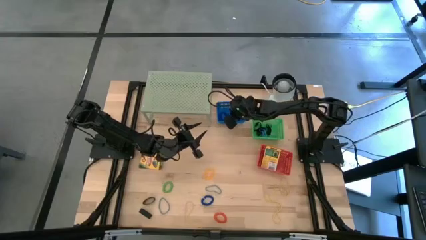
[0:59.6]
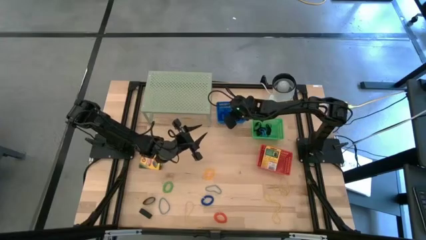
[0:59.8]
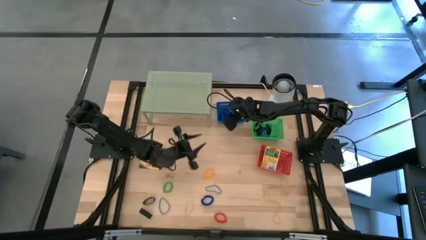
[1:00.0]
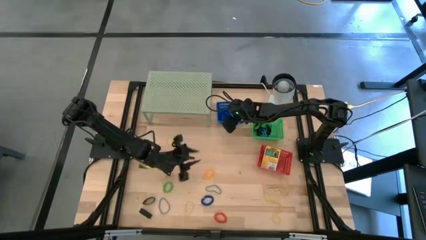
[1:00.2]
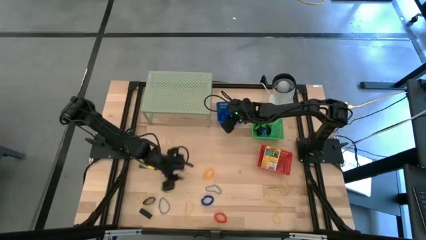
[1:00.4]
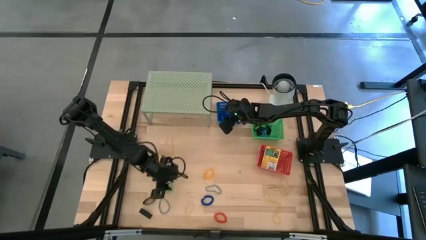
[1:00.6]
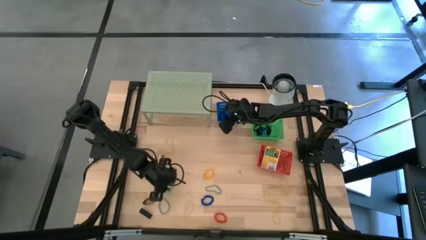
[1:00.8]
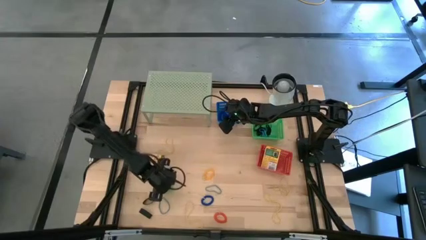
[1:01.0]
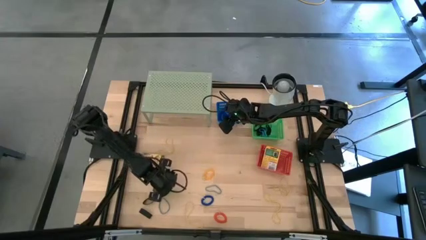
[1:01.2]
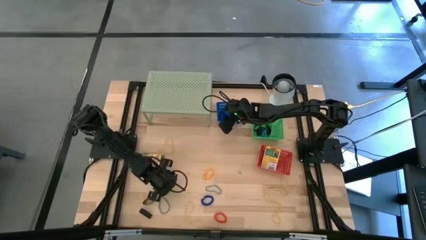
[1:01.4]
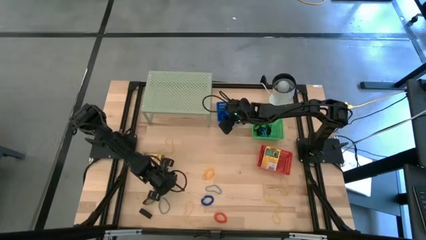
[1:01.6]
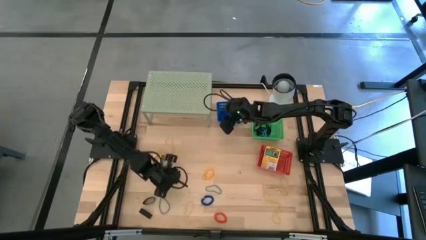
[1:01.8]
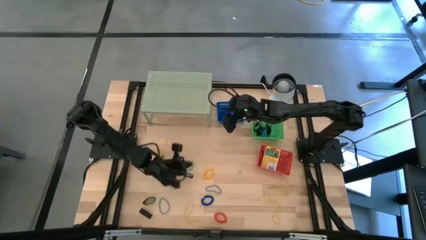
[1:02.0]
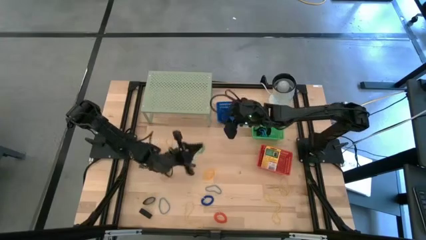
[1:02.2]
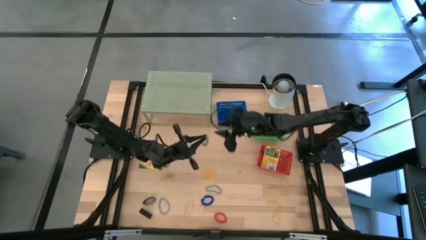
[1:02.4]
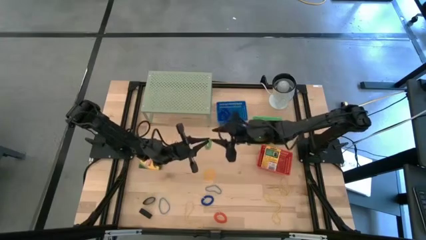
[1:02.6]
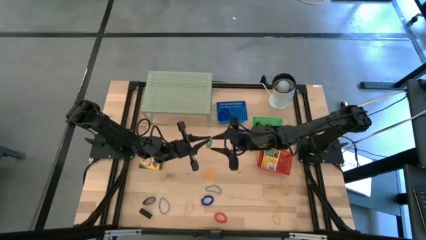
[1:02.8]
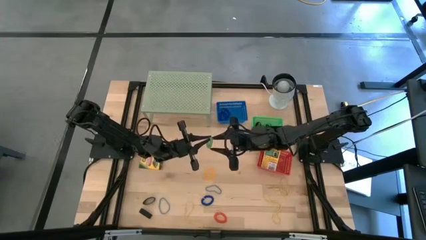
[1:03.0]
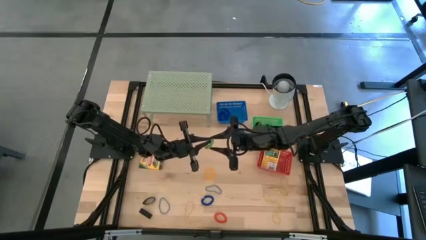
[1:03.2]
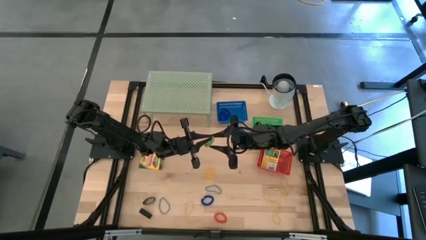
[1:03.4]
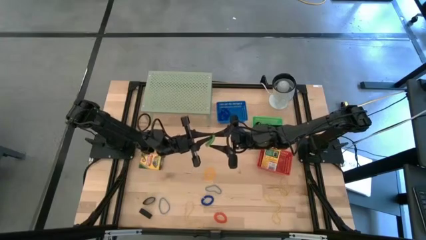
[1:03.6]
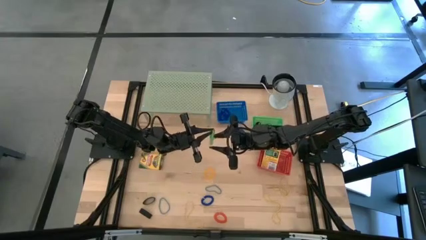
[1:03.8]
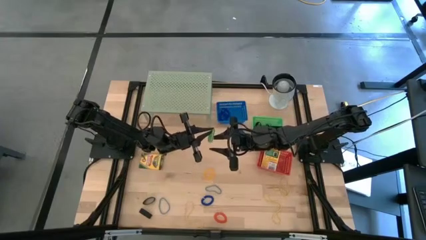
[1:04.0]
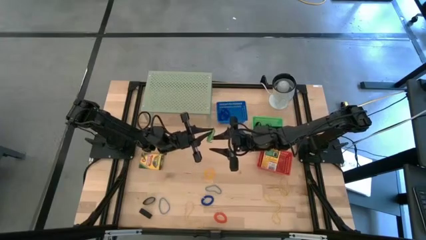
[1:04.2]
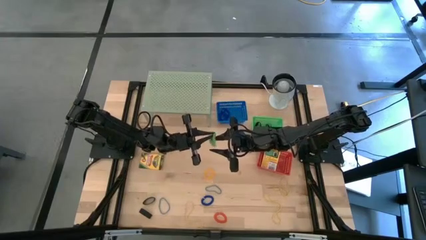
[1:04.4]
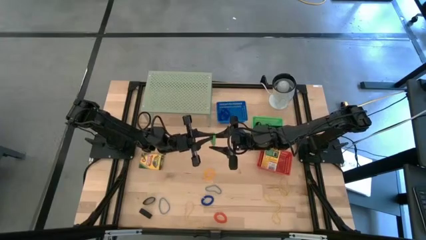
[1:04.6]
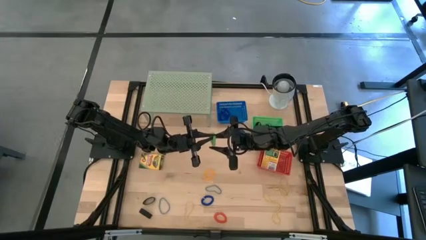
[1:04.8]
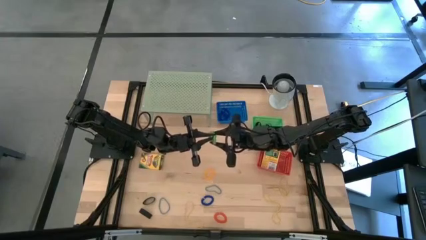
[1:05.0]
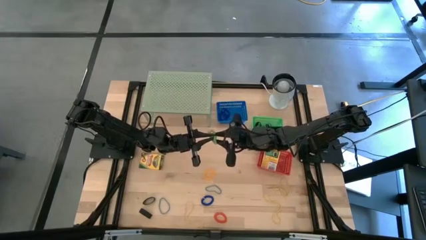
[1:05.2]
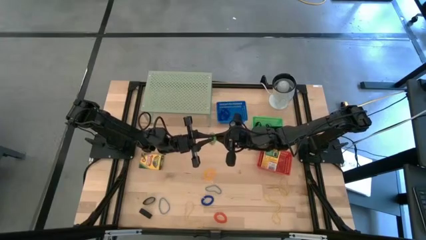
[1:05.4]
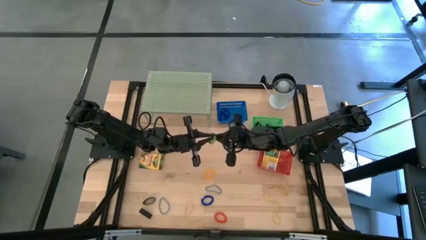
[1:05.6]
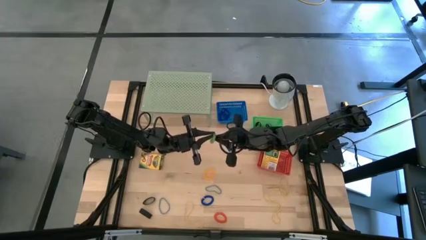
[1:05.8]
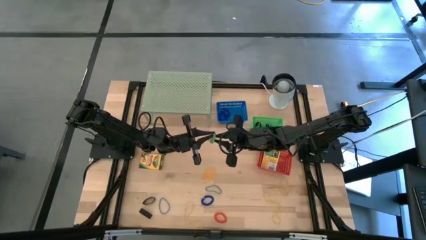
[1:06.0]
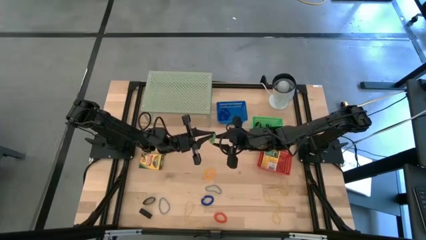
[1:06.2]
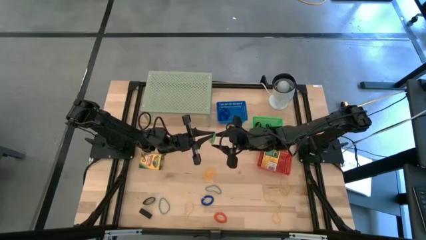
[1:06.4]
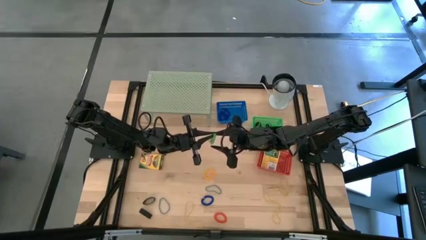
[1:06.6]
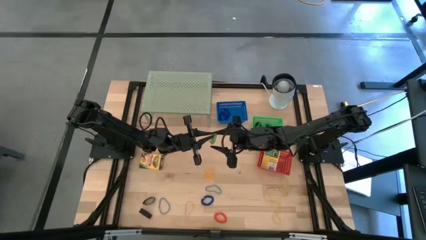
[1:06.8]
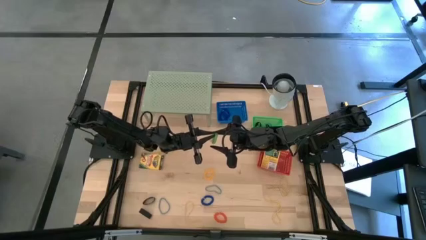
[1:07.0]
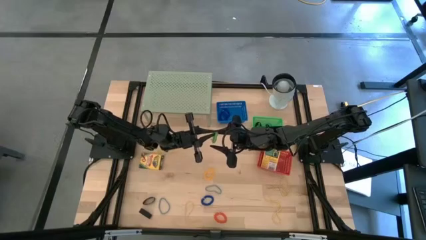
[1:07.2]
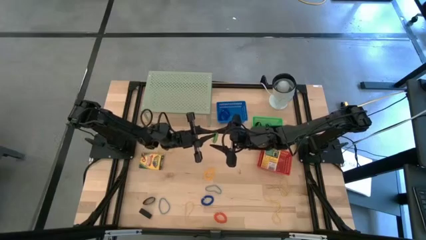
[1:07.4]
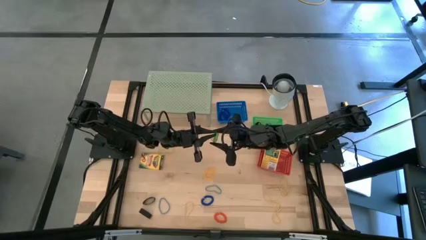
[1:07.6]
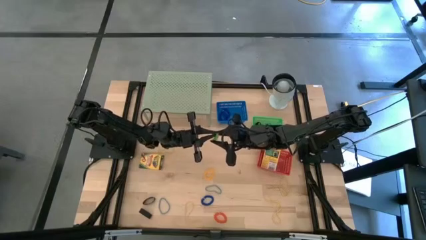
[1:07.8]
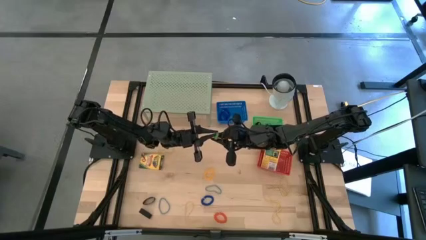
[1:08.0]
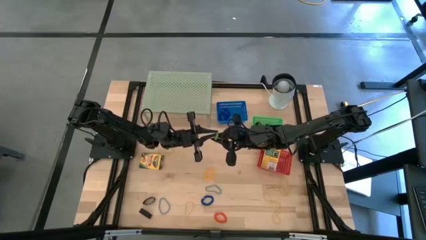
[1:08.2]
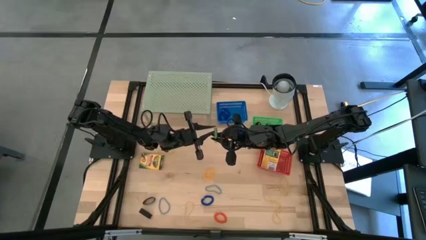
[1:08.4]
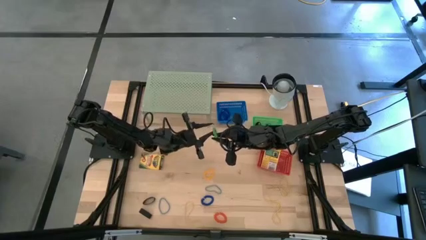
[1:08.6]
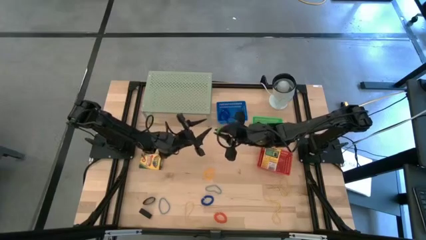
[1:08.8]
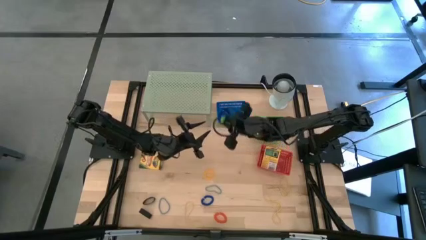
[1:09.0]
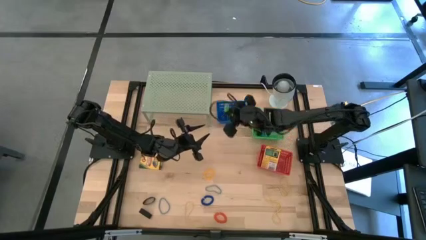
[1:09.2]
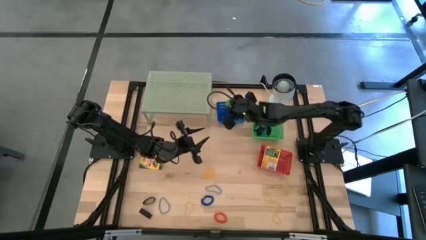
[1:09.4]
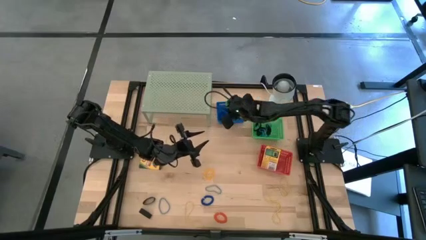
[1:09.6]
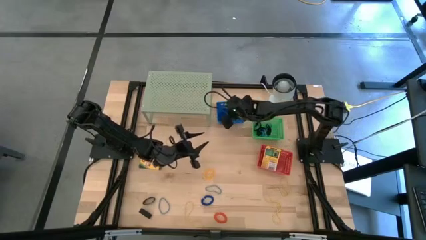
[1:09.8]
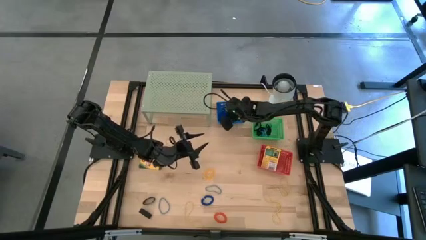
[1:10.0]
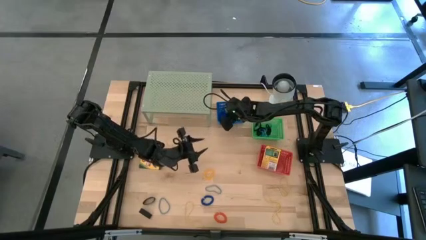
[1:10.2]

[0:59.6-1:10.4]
Task: Pick & Place Office Desk Supplies
Put the green spring keychain into the blue bin

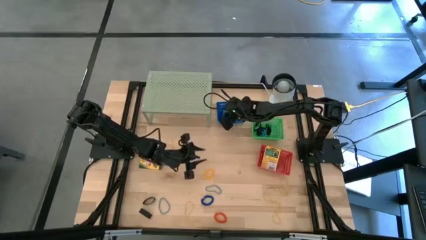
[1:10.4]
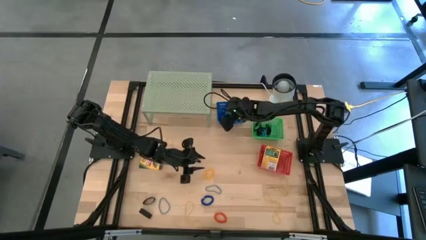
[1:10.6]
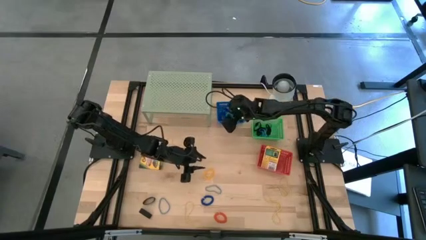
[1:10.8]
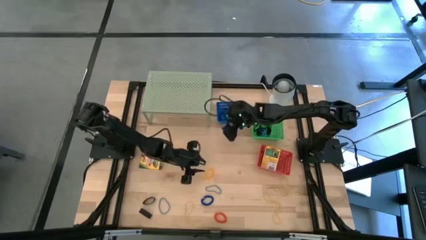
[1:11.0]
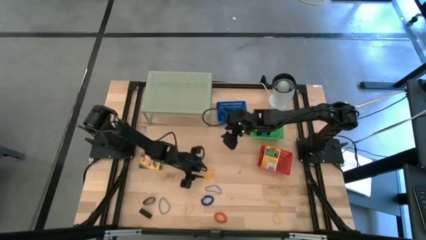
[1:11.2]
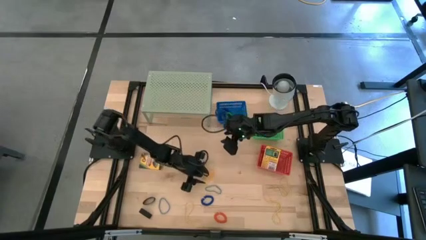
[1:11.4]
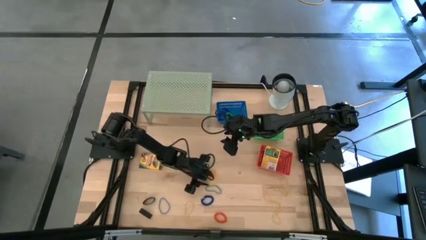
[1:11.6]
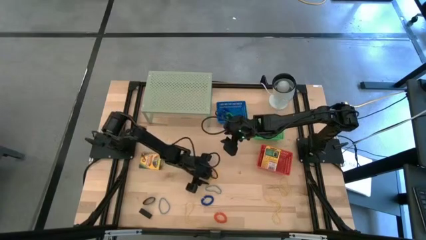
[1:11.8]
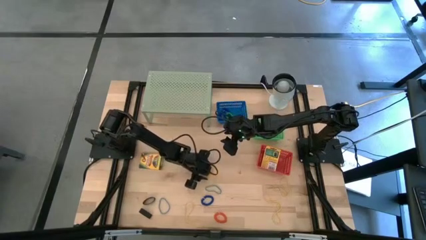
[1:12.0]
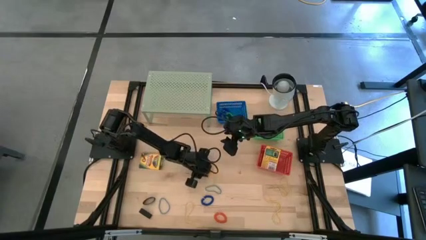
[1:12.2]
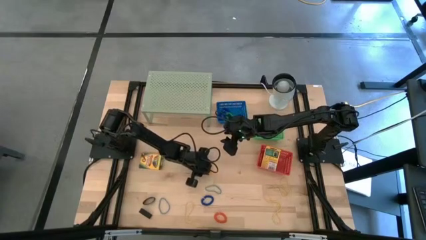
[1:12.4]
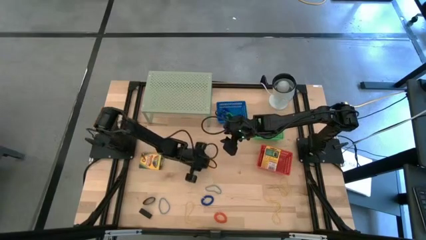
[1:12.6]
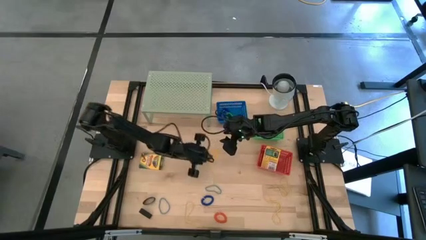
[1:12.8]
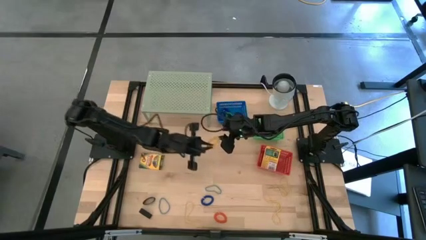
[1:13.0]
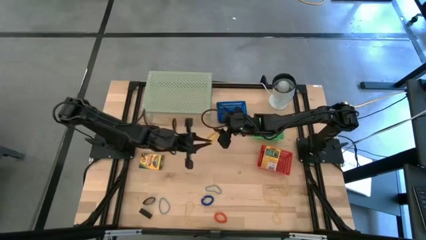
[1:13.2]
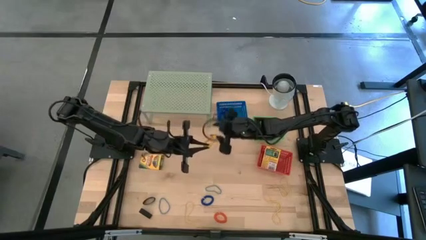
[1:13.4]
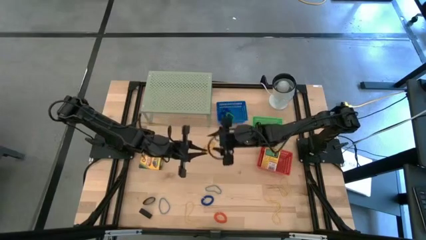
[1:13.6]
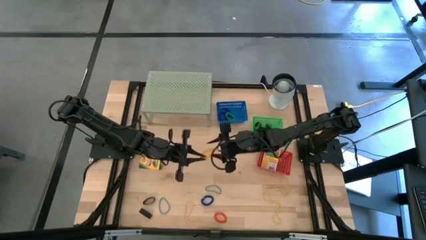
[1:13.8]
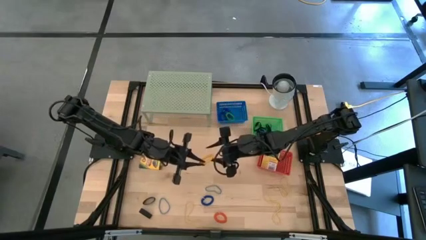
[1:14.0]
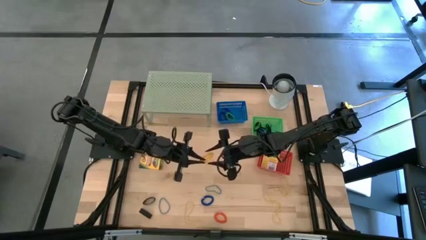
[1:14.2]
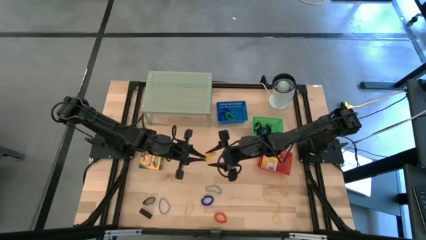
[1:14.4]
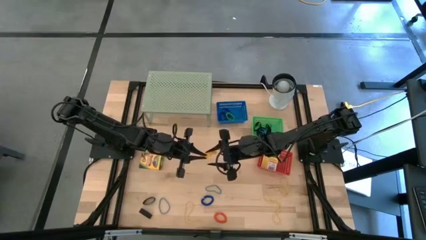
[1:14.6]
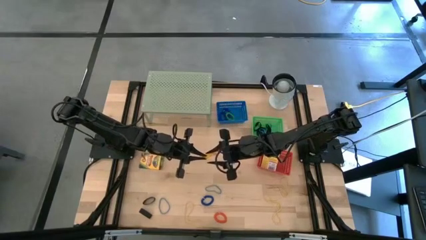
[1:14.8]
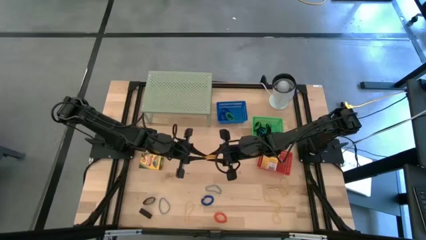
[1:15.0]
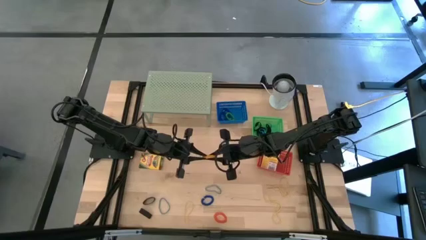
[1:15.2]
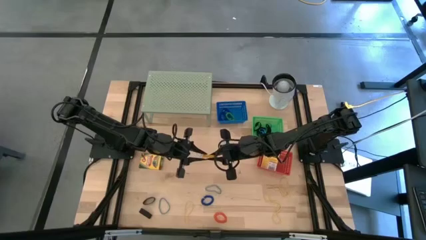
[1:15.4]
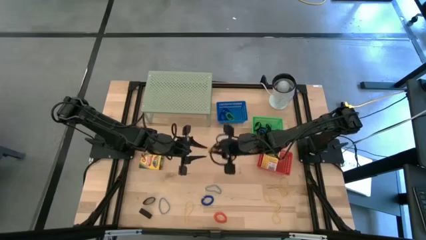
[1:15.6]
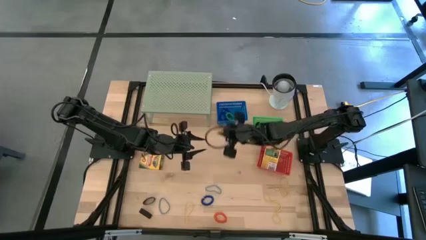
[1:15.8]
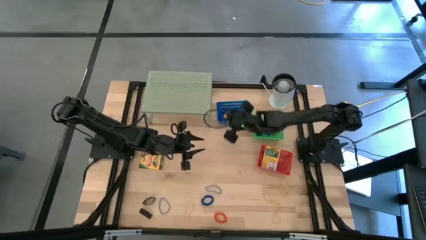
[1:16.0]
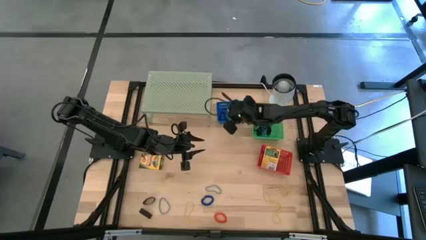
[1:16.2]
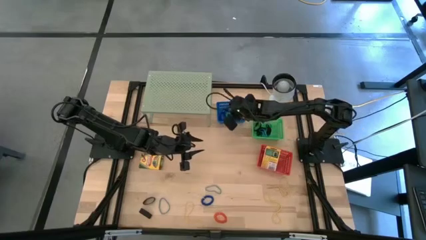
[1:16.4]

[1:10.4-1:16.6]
Put the yellow spring keychain into the blue bin
